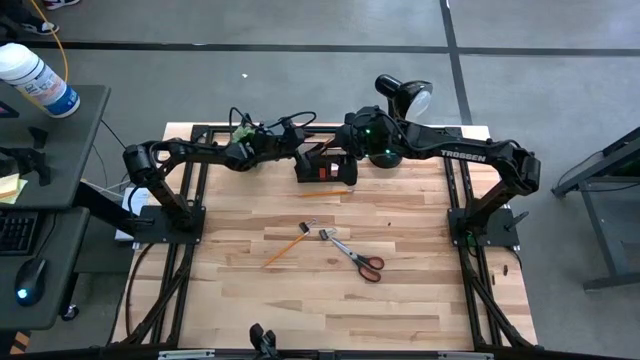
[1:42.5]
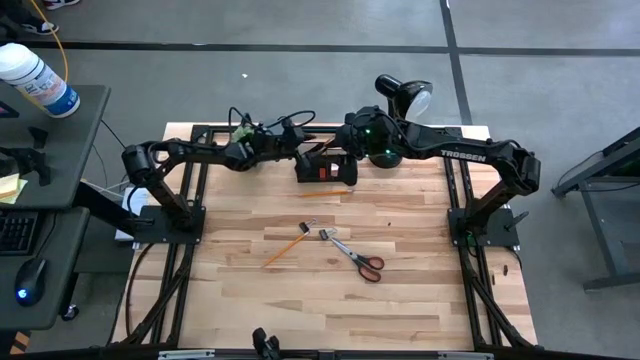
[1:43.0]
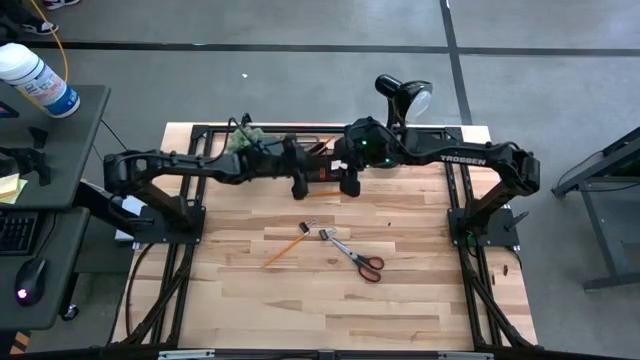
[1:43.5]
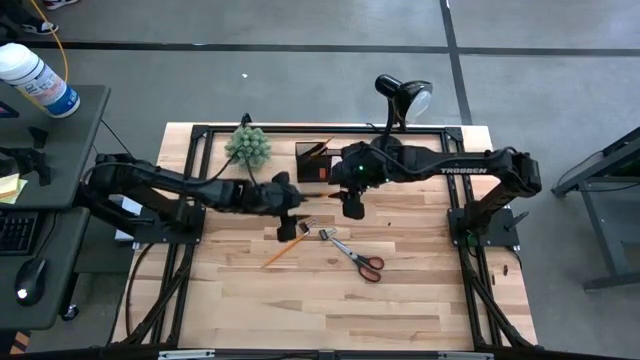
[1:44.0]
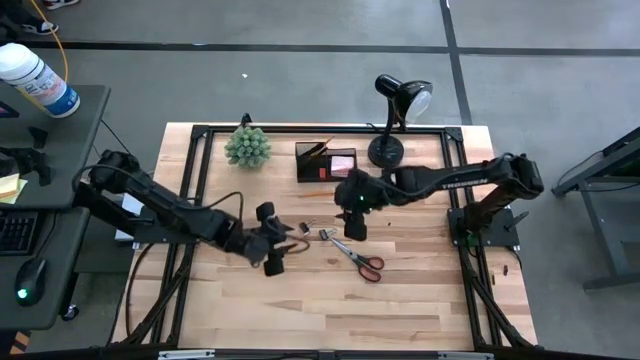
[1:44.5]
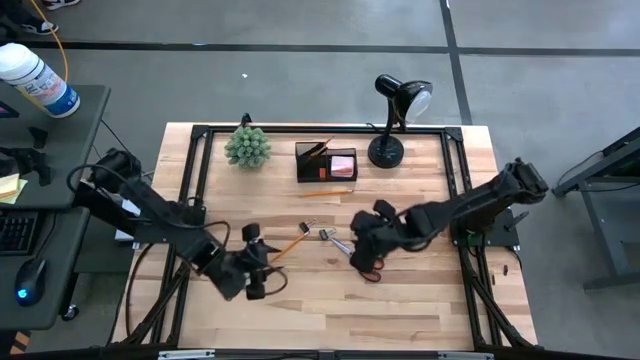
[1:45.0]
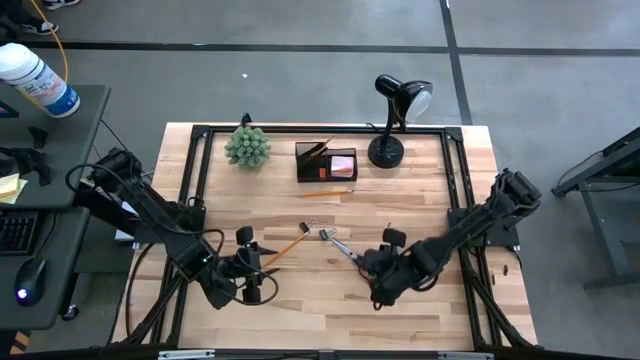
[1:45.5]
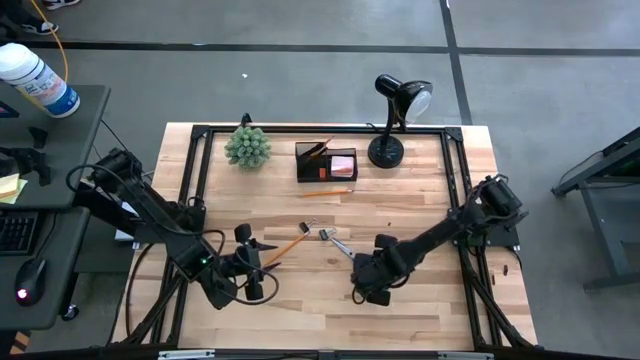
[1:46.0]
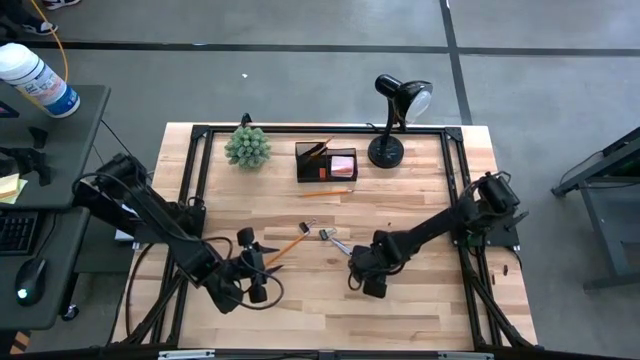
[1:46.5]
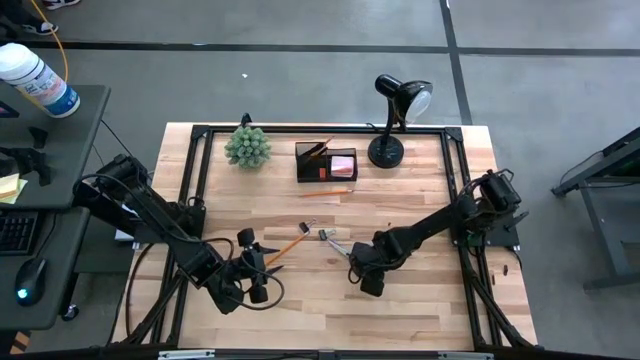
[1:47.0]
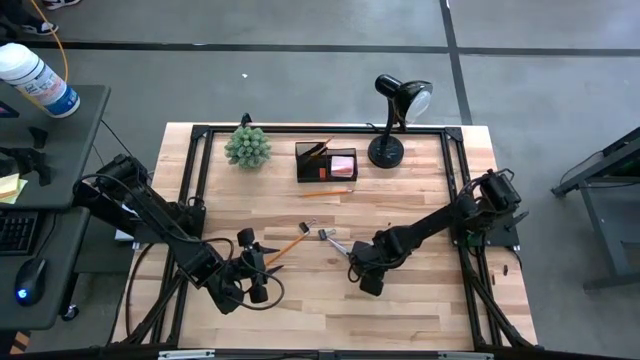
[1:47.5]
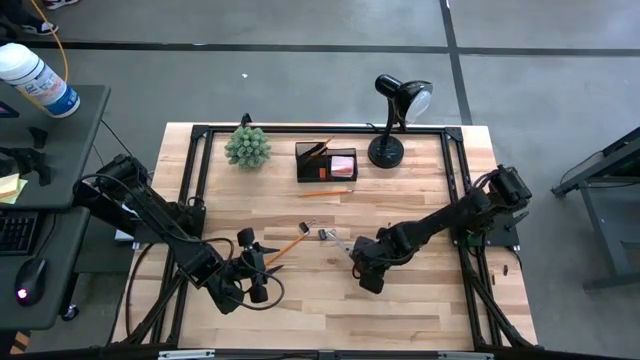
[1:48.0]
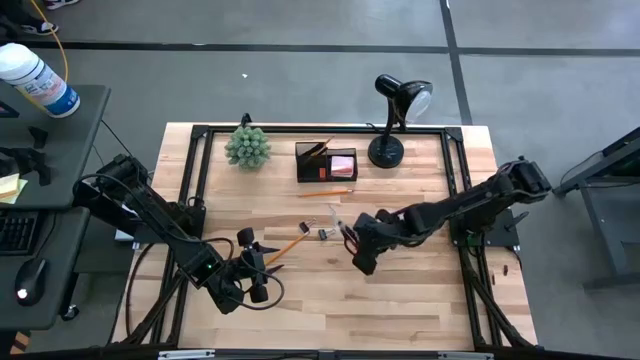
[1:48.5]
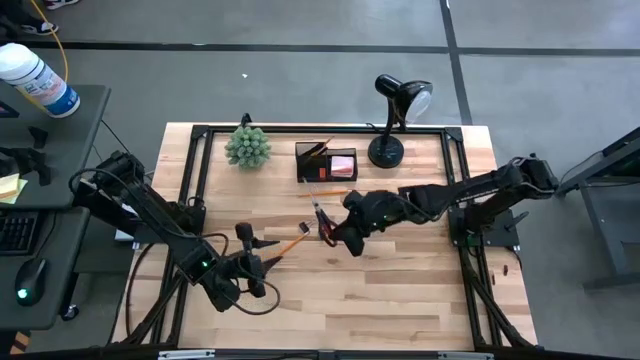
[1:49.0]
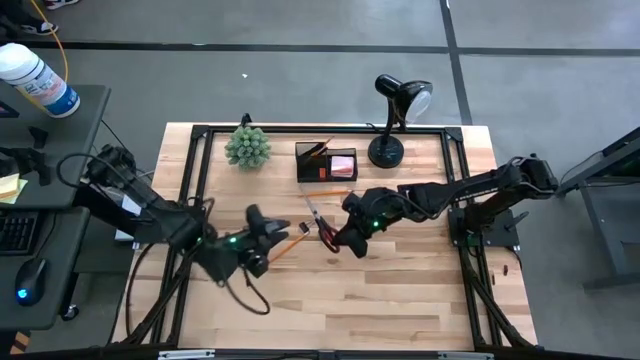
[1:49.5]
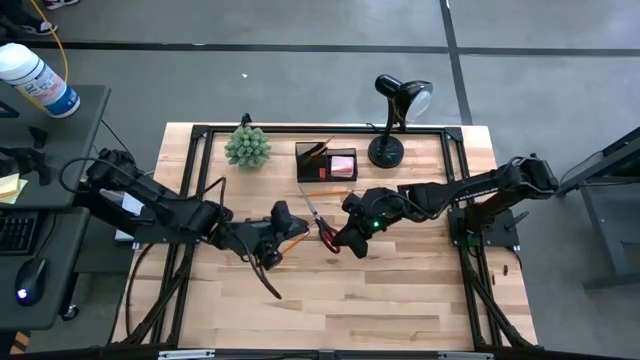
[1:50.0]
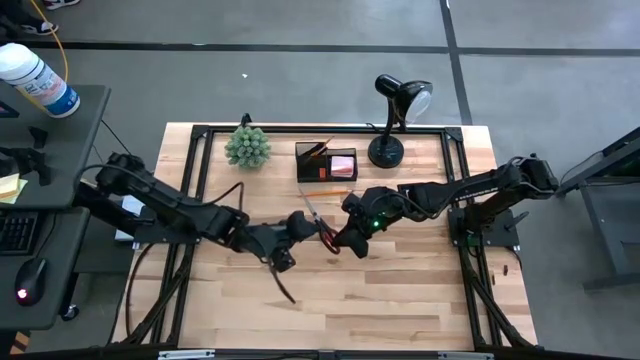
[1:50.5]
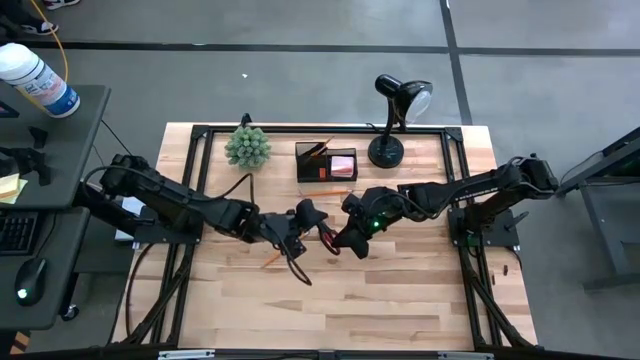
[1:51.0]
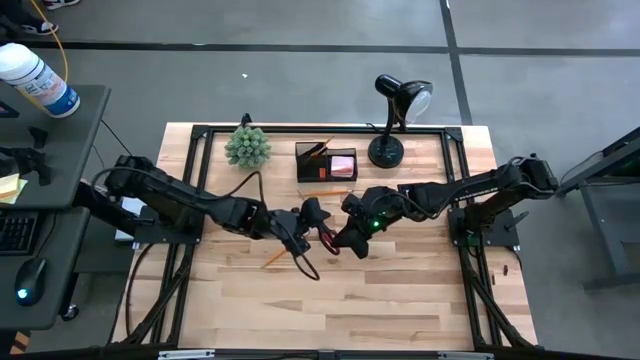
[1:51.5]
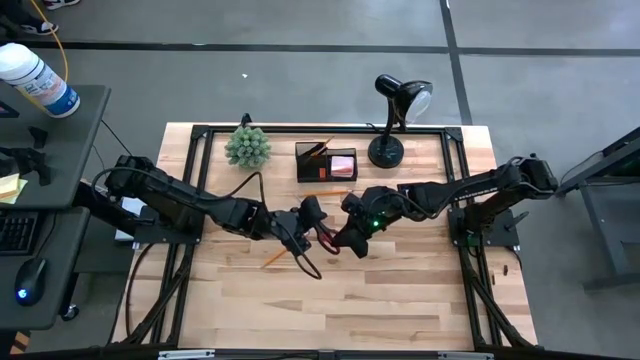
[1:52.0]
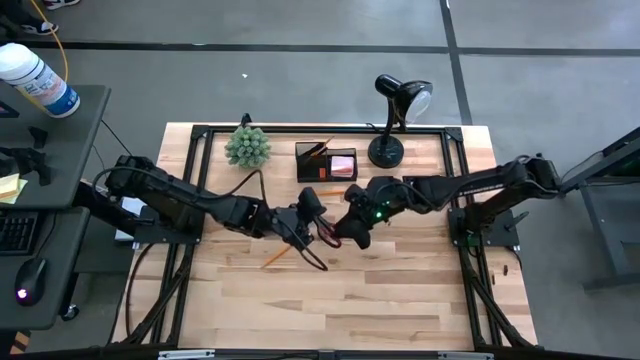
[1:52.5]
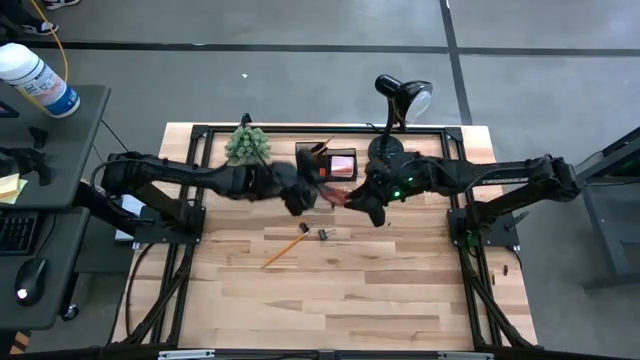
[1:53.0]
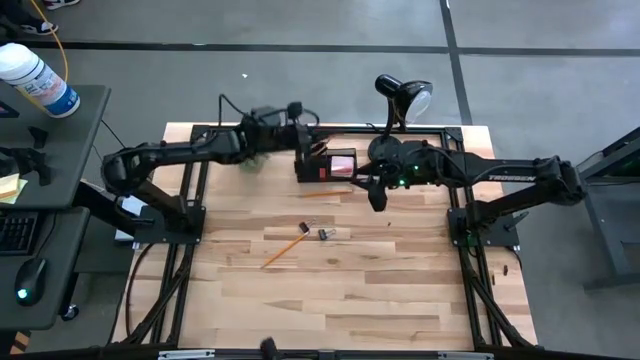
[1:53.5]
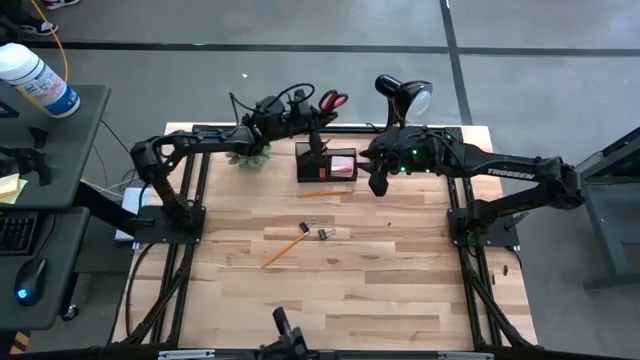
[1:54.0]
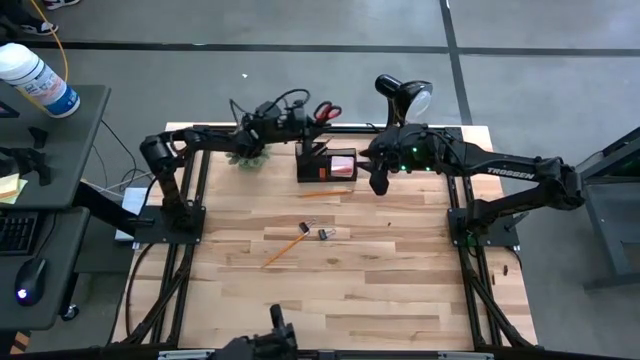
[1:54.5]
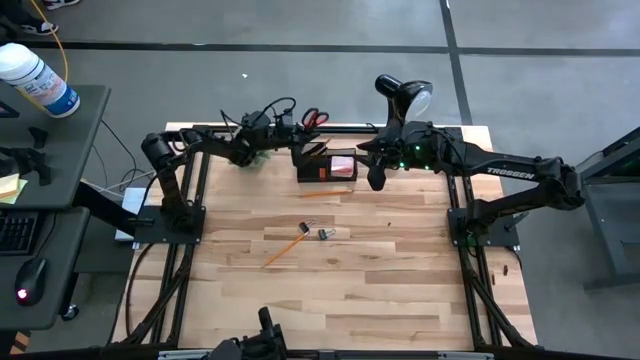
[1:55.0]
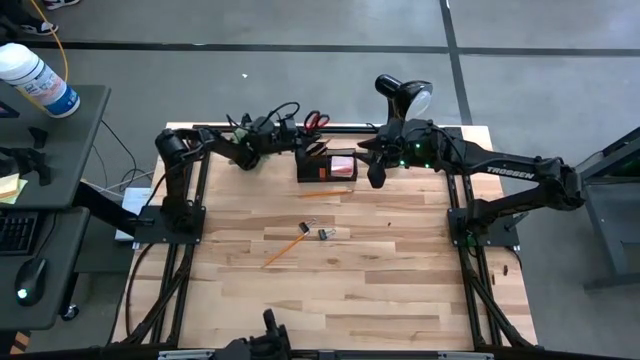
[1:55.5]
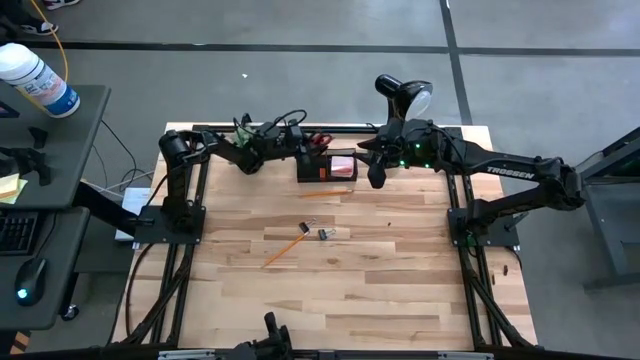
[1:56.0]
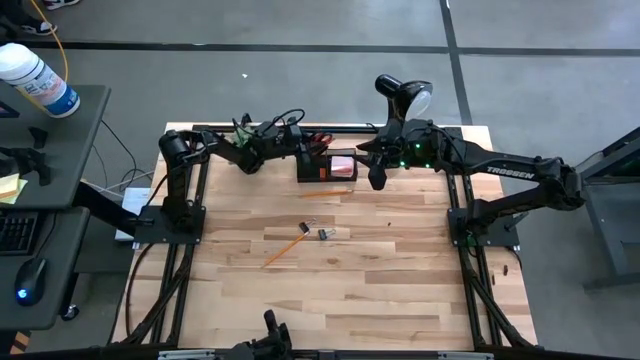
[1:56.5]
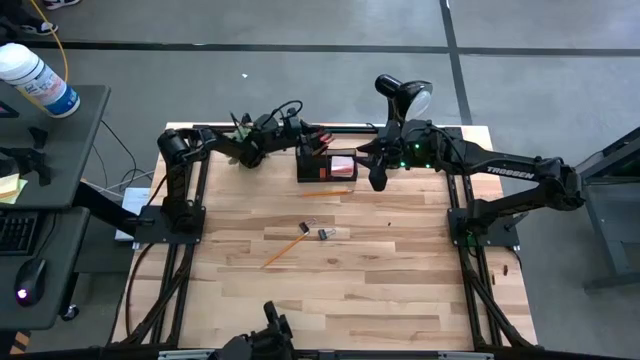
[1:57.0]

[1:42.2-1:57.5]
Task: Pick and place office supplies into organizer
Put the black scissors into the black desk organizer

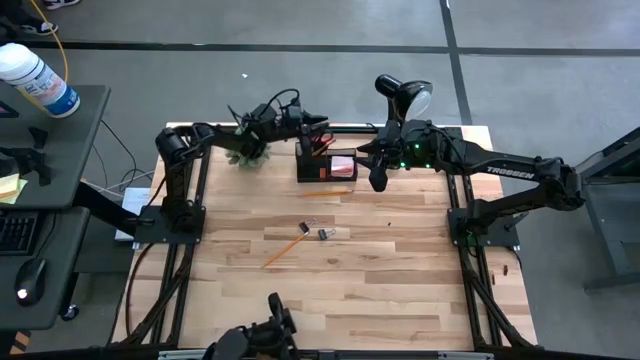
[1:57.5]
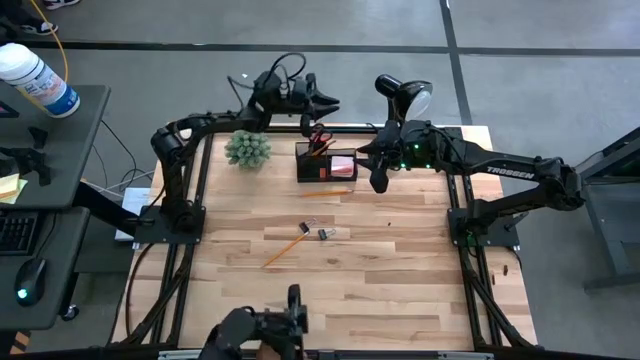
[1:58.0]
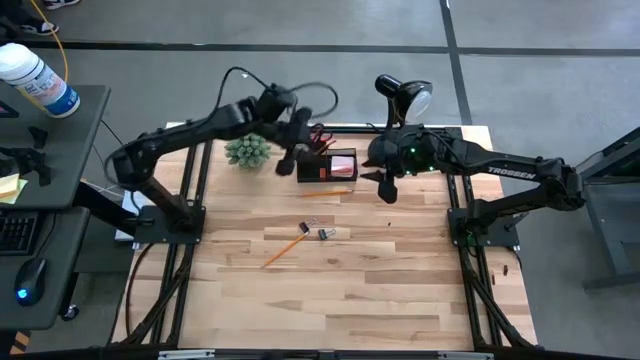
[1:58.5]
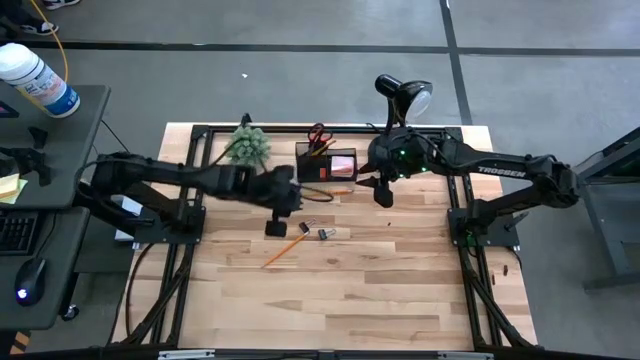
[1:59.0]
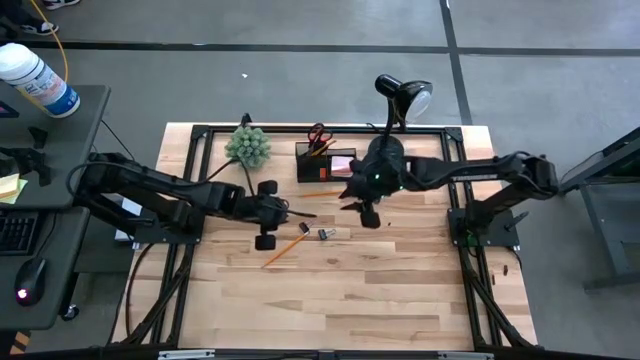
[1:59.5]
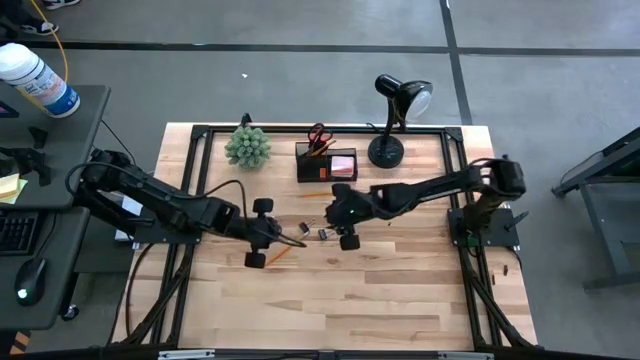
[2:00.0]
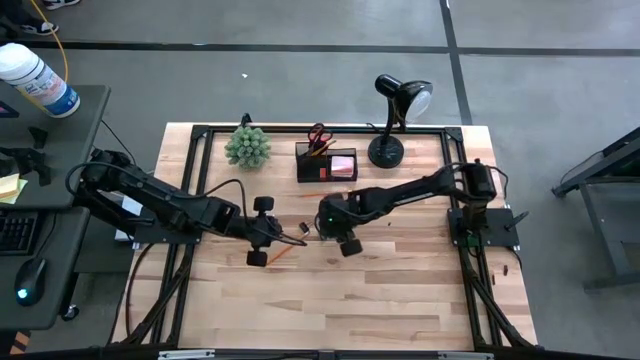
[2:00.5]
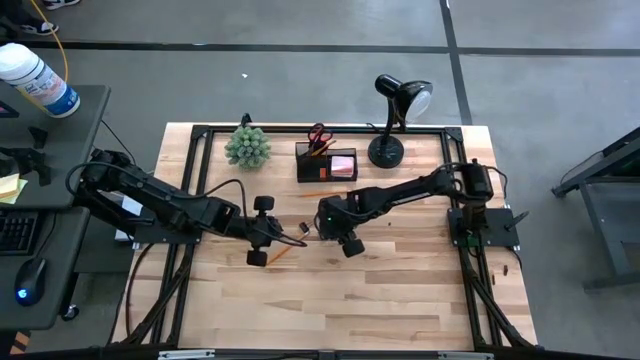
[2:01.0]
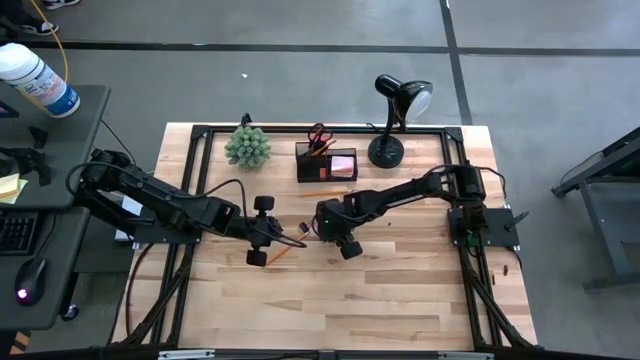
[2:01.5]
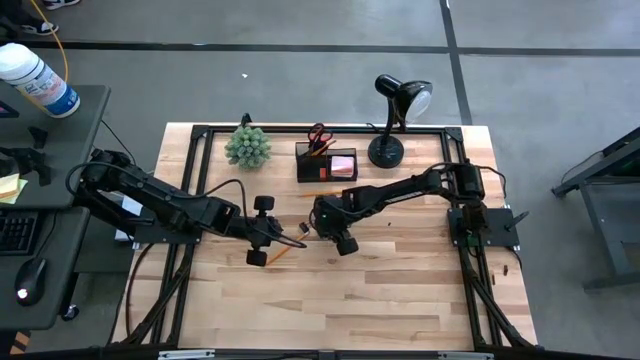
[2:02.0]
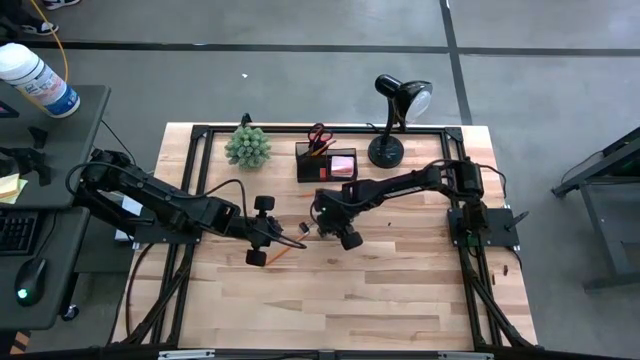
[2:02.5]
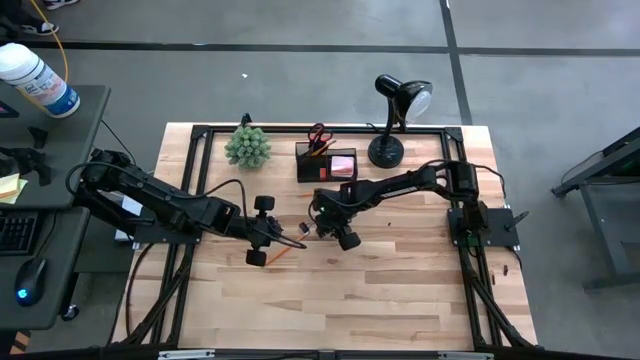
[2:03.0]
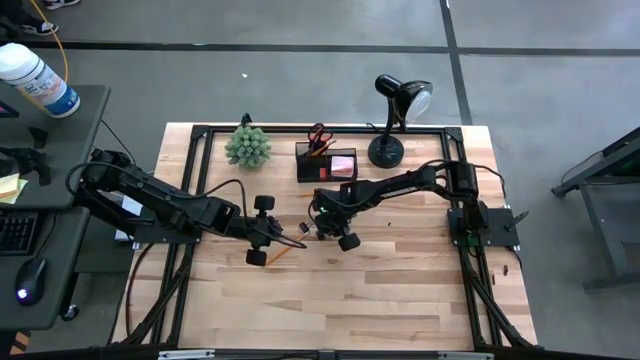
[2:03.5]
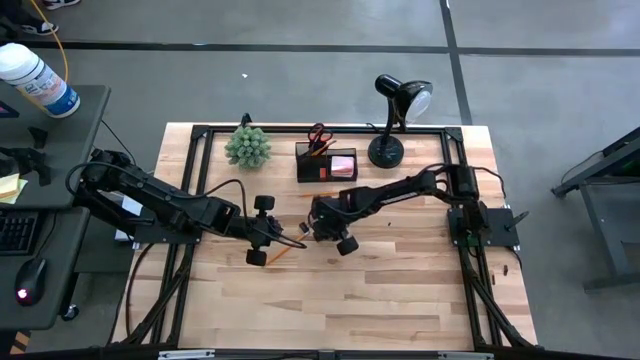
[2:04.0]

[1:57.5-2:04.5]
Put the right black binder clip into the black desk organizer
